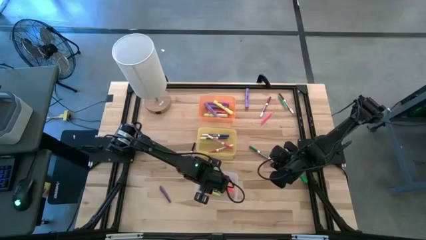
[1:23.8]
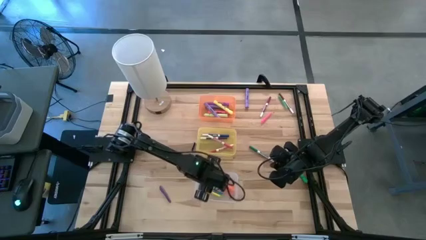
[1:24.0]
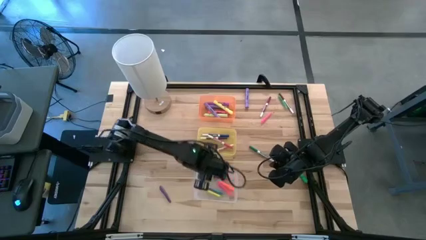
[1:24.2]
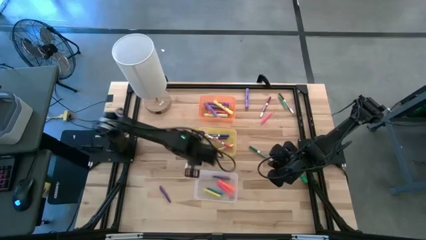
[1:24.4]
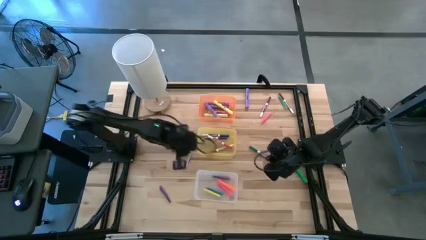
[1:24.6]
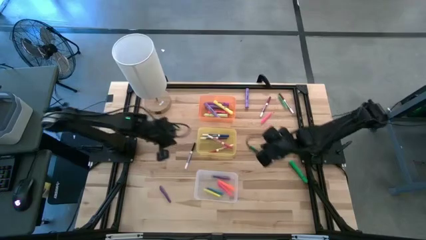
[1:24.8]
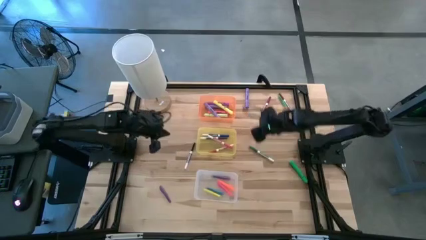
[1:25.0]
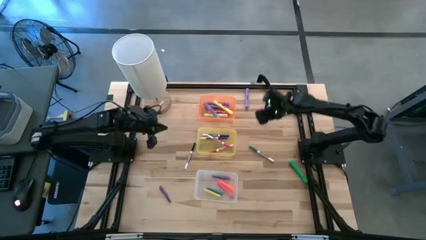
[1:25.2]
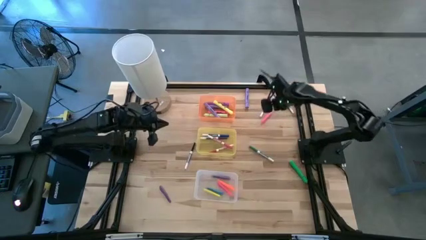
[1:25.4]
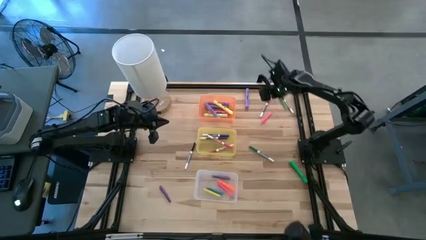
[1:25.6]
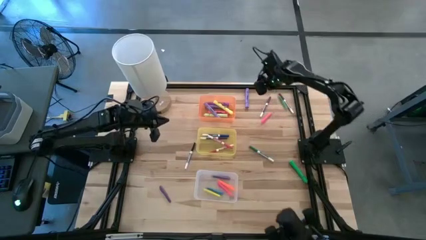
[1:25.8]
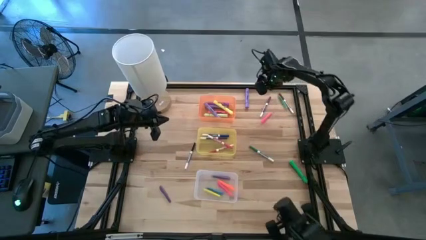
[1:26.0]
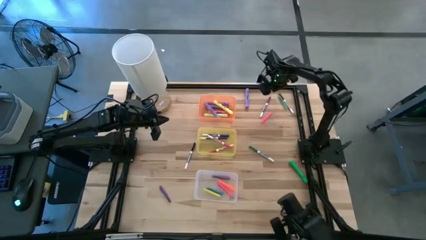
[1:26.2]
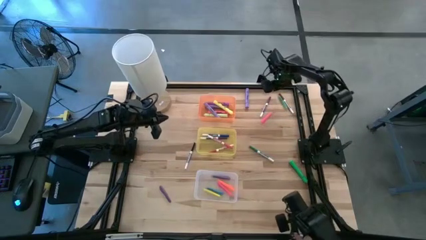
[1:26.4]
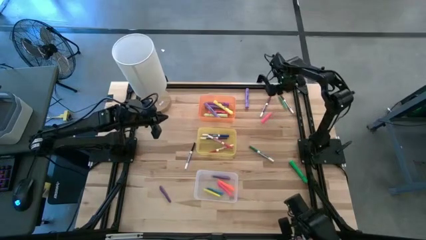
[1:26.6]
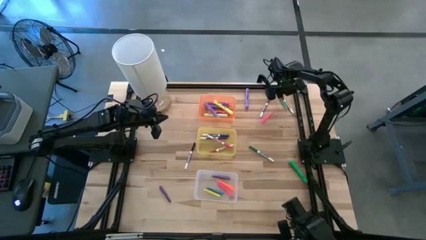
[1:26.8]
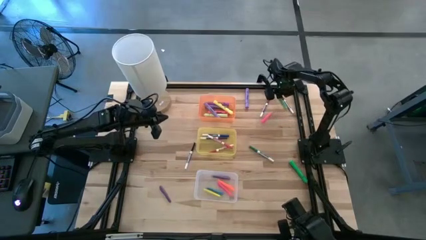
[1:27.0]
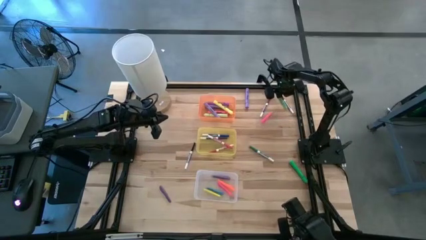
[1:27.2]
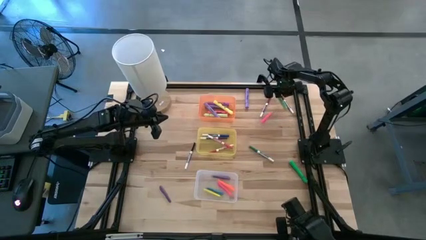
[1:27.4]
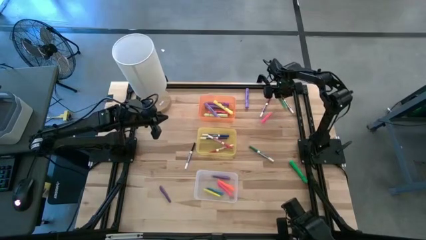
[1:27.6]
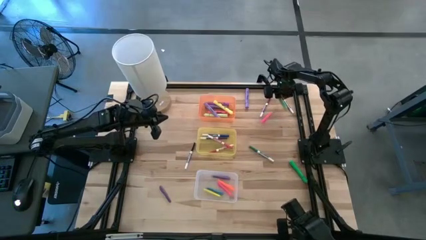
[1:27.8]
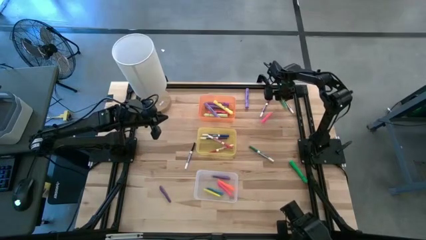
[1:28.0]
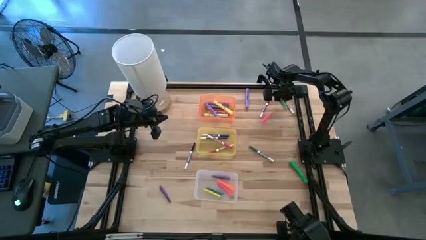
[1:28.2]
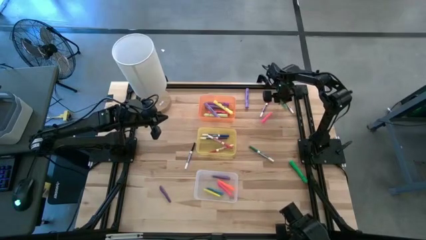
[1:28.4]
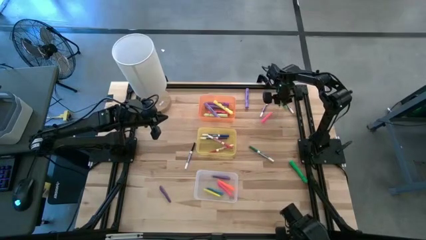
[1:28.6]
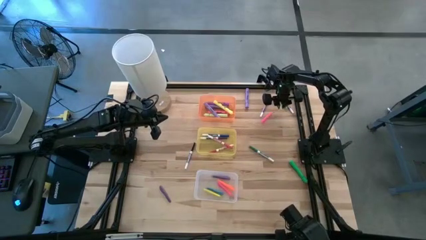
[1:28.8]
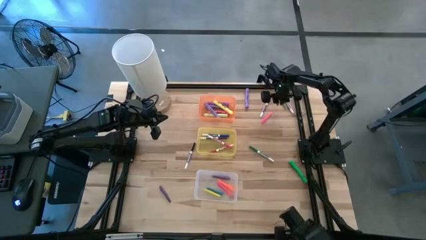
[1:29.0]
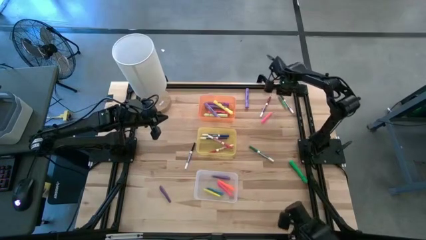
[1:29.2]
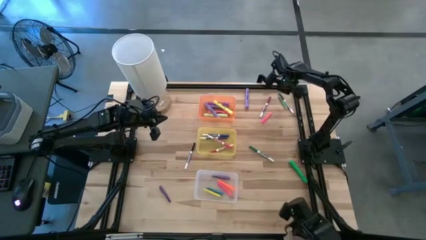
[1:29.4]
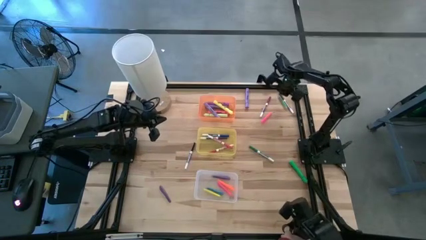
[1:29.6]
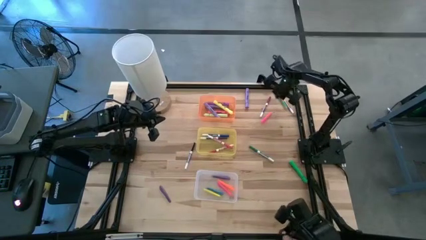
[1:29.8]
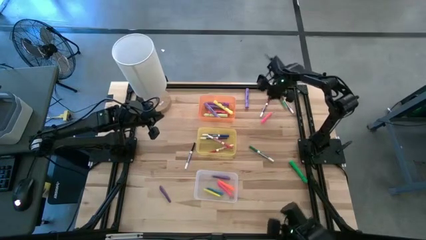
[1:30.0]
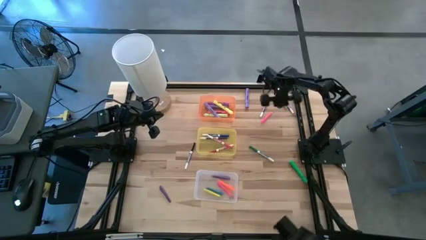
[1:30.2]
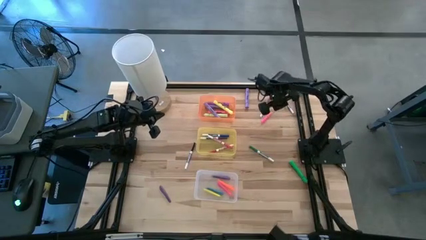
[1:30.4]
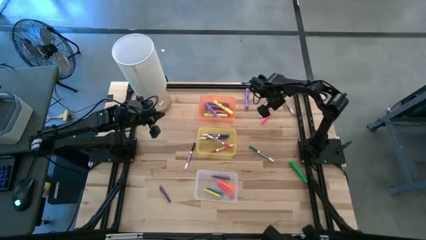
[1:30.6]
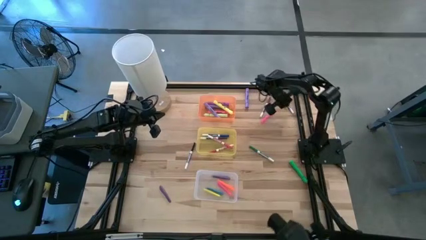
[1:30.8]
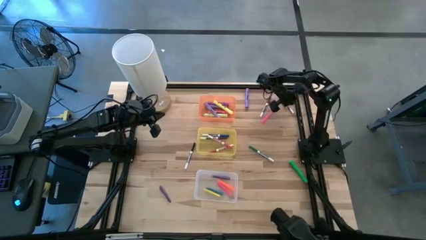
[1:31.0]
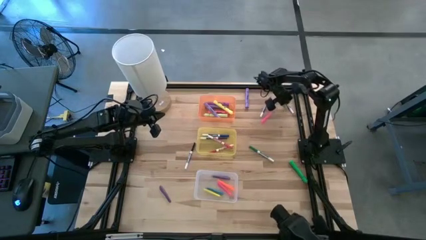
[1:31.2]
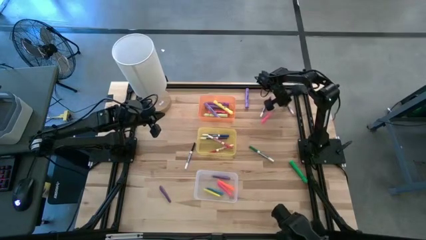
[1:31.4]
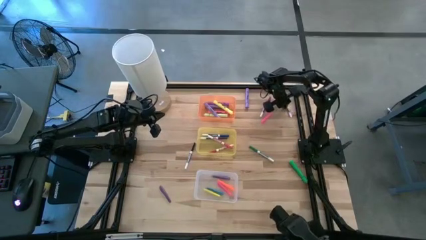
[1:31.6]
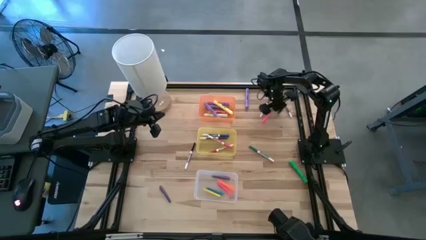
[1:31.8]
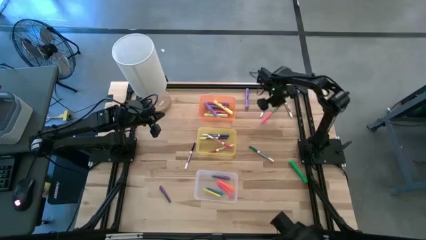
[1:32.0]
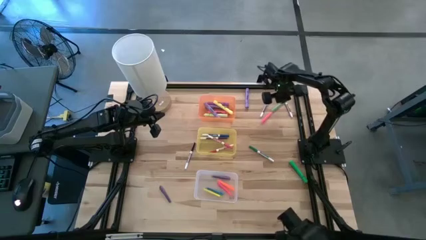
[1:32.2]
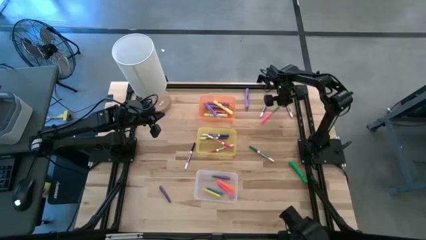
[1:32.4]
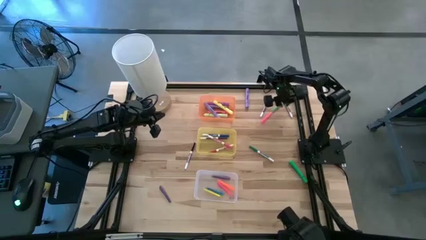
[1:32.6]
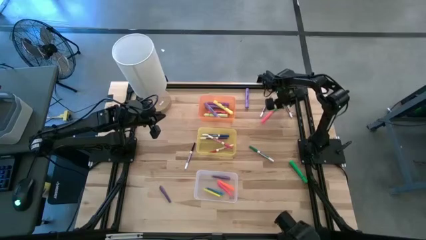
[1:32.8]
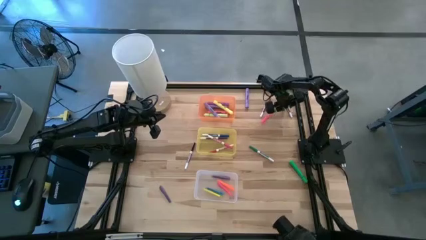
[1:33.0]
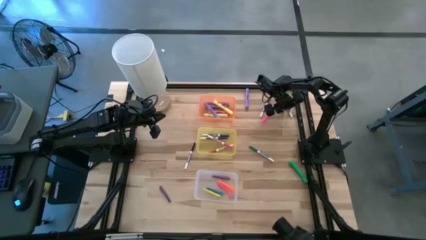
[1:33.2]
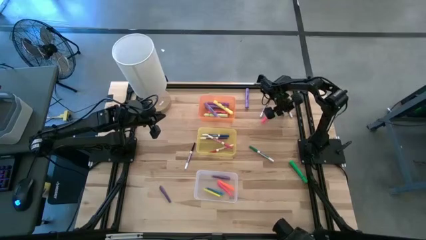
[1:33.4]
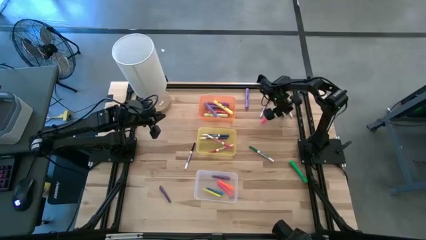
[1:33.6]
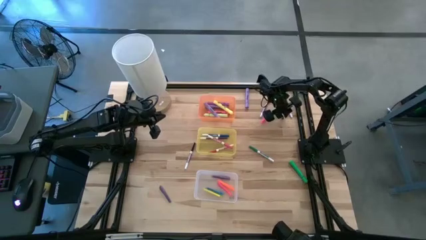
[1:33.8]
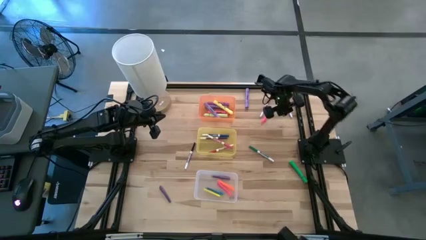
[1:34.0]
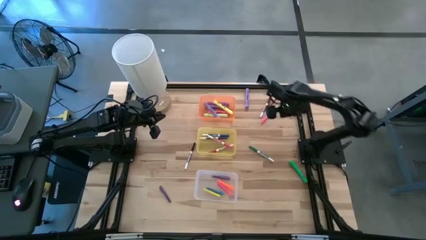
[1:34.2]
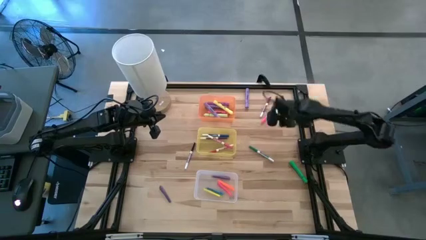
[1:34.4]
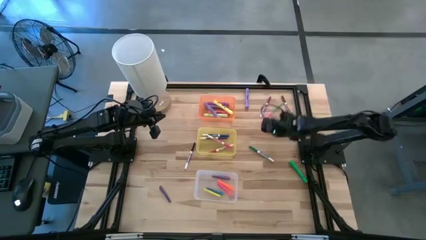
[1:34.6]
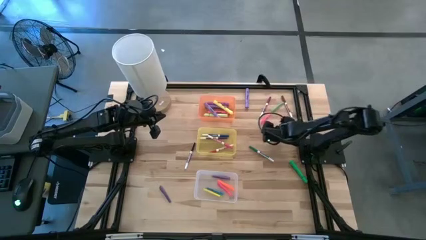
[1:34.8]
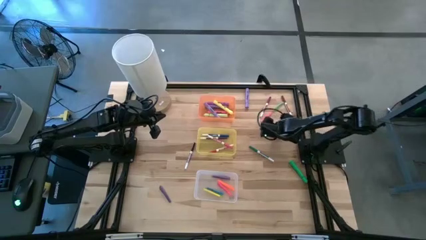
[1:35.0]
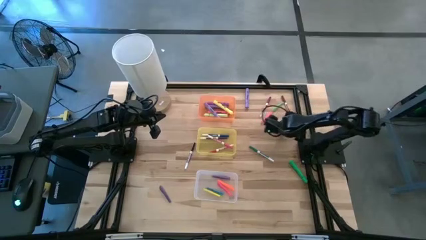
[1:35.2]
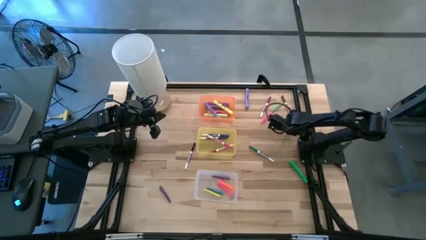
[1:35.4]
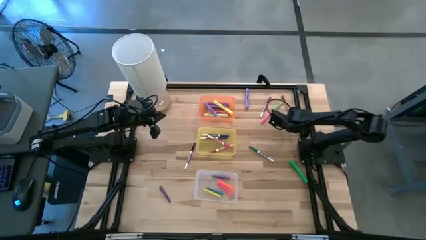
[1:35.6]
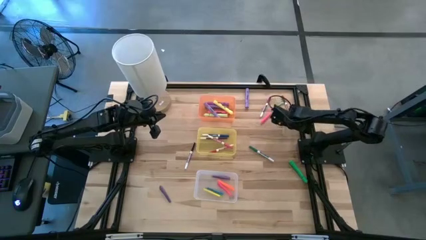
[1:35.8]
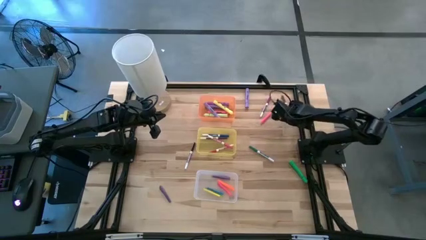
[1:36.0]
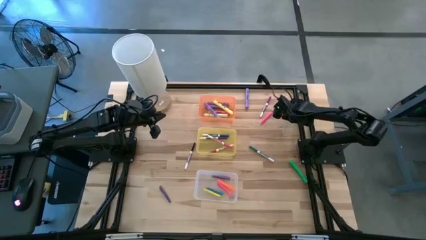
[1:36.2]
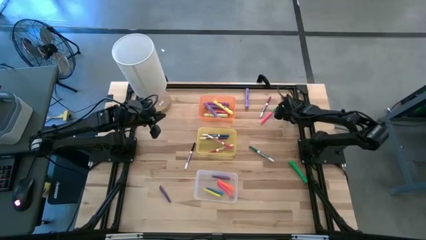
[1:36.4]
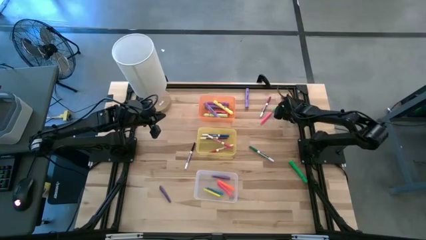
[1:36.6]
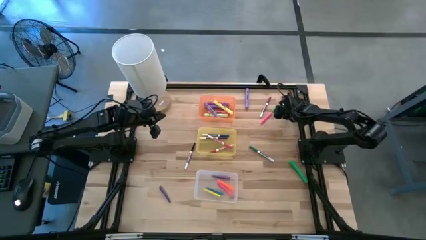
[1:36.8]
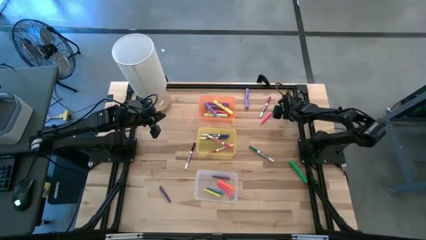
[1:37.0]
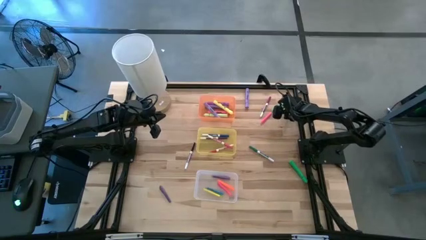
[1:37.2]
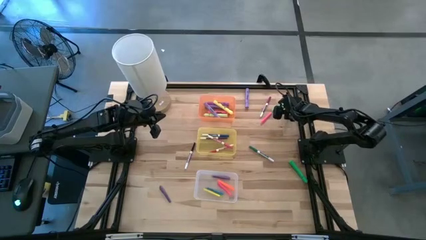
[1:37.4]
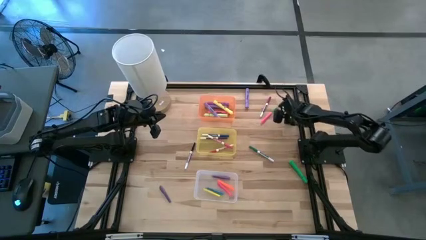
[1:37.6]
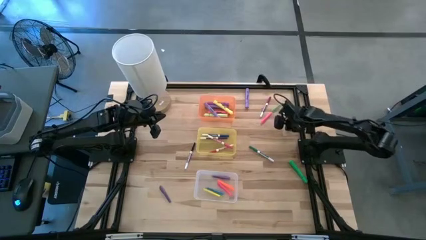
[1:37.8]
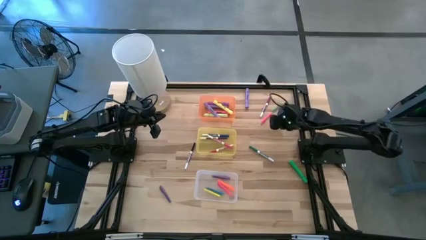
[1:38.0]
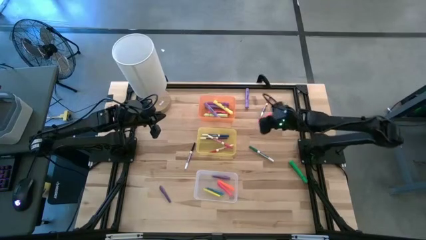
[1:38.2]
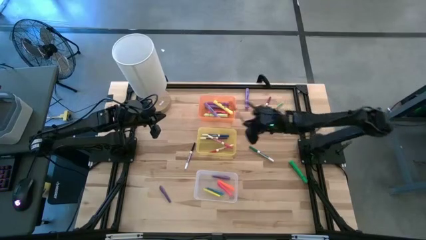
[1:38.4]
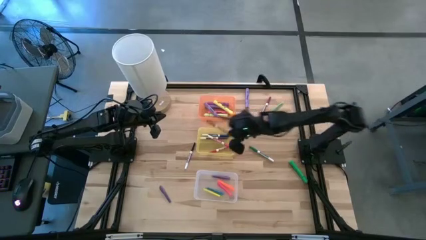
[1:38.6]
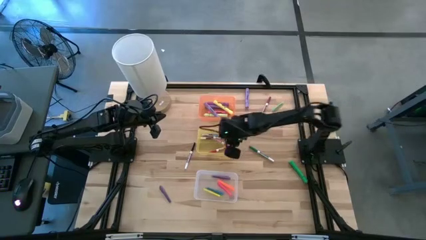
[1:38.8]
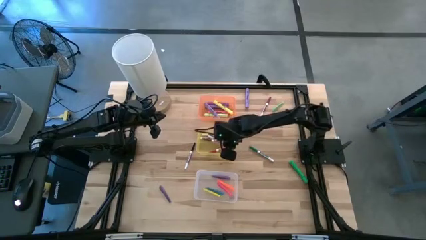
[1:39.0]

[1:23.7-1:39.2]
Task: Pick & Place Markers
Put the brown marker pen into the yellow bin

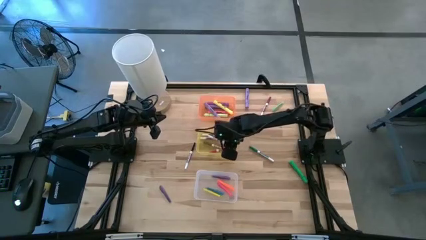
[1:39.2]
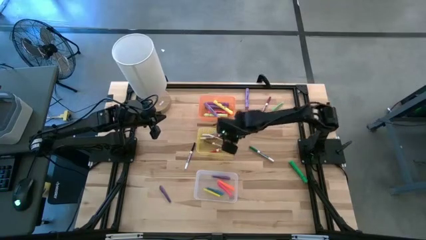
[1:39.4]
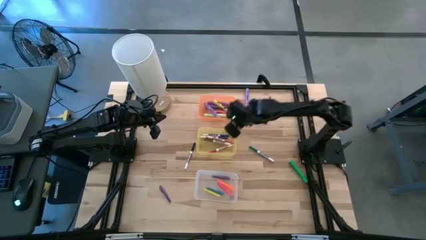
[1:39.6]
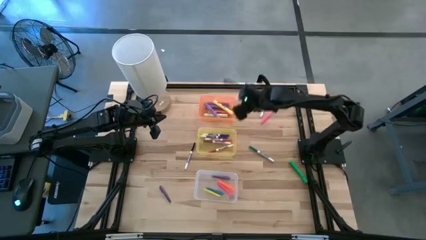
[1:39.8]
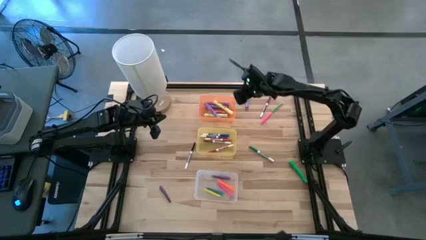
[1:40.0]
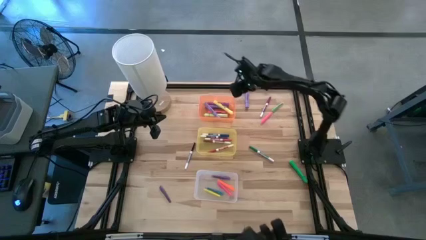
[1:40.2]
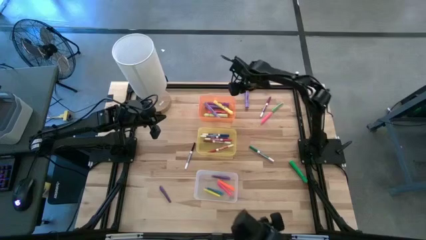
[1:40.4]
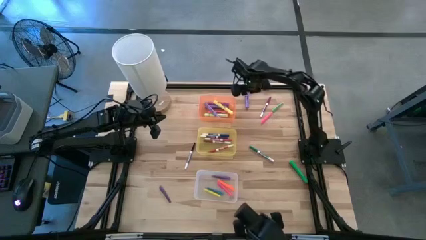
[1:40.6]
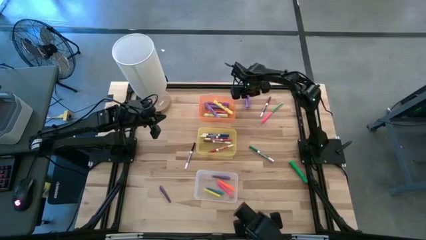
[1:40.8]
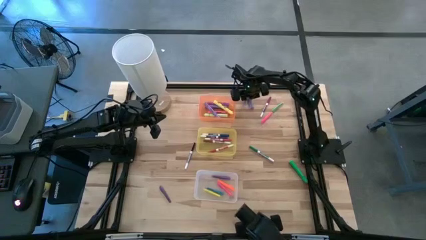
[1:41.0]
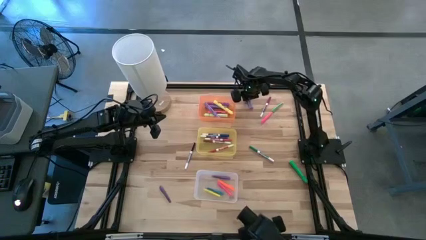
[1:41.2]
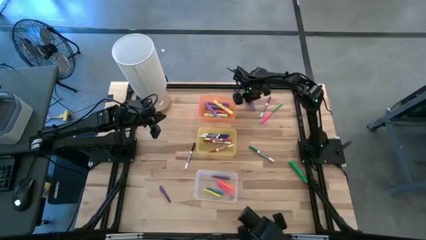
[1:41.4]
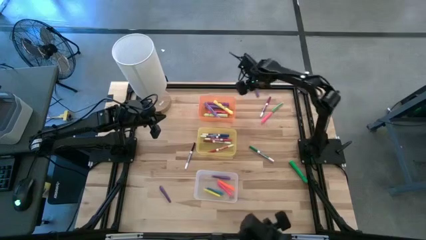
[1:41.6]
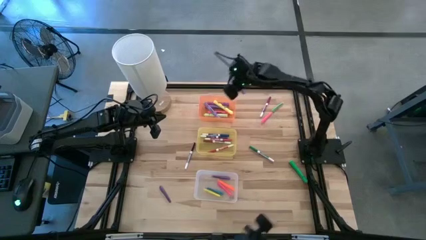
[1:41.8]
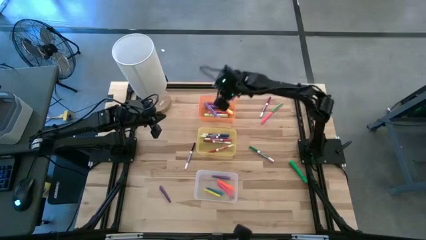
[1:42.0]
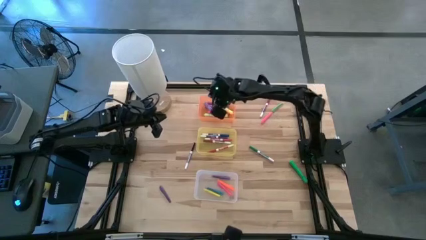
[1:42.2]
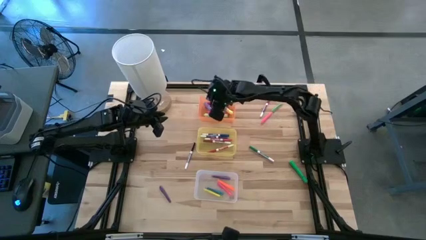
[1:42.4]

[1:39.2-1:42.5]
Put the light purple highlighter pen into the orange bin
